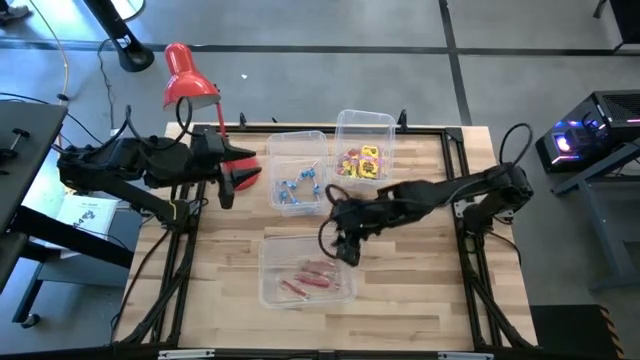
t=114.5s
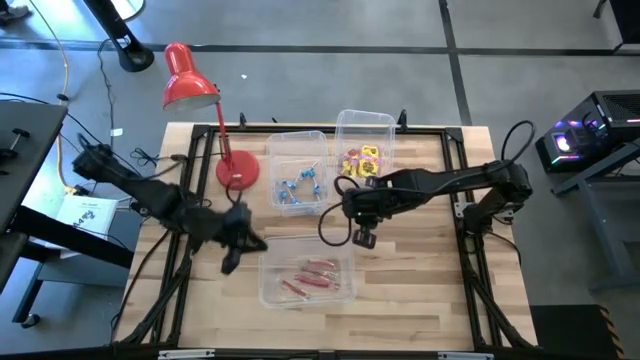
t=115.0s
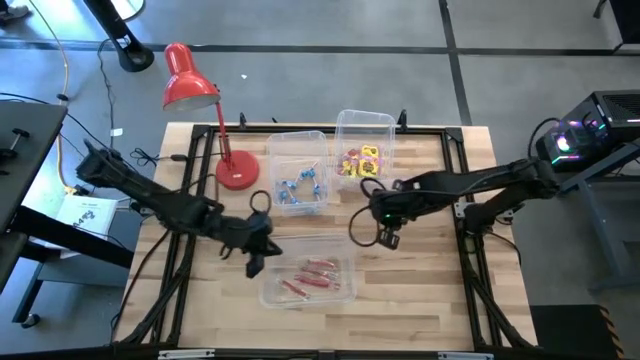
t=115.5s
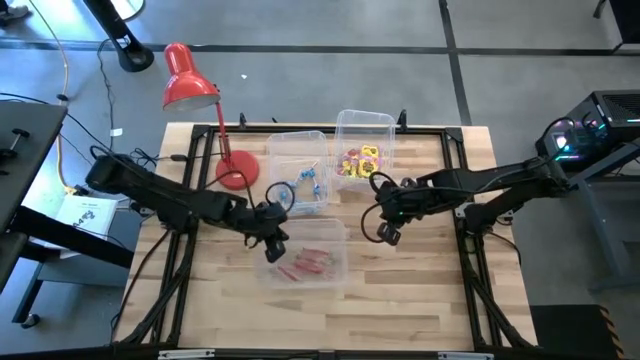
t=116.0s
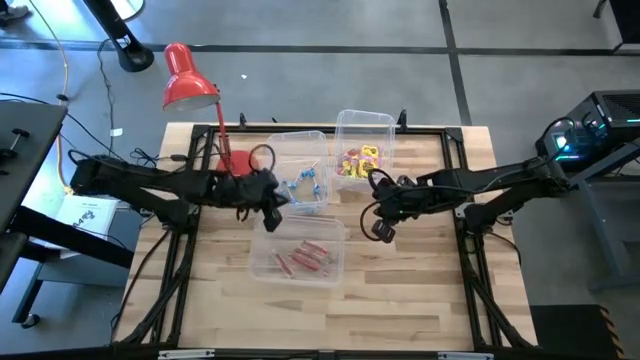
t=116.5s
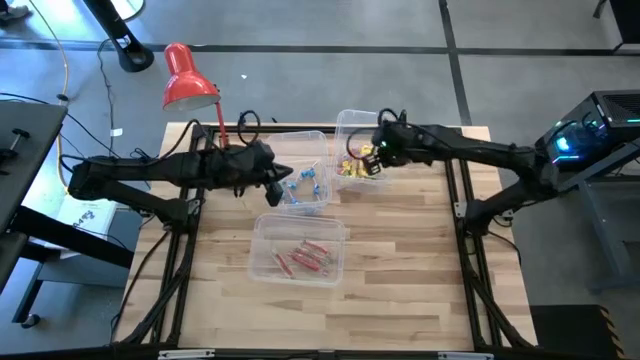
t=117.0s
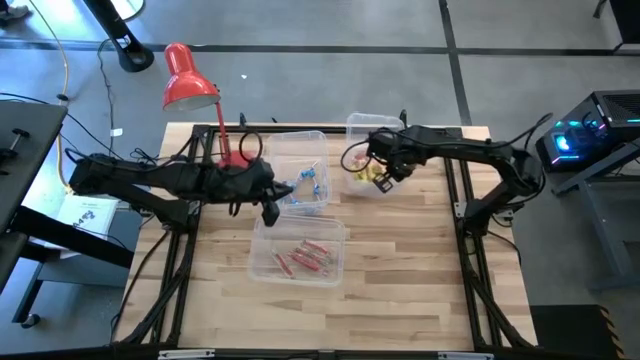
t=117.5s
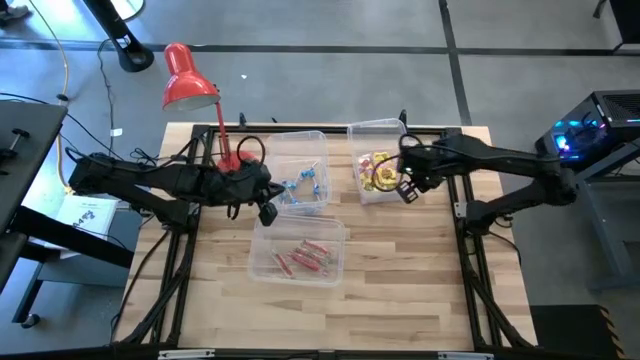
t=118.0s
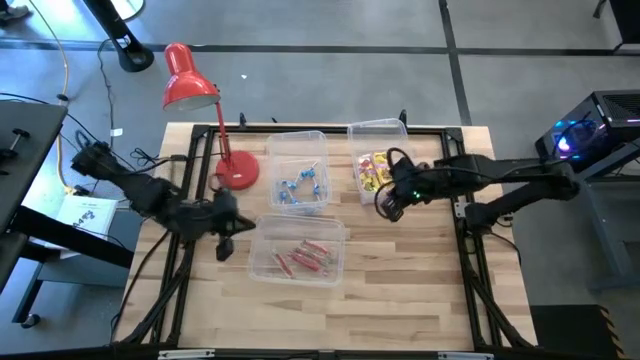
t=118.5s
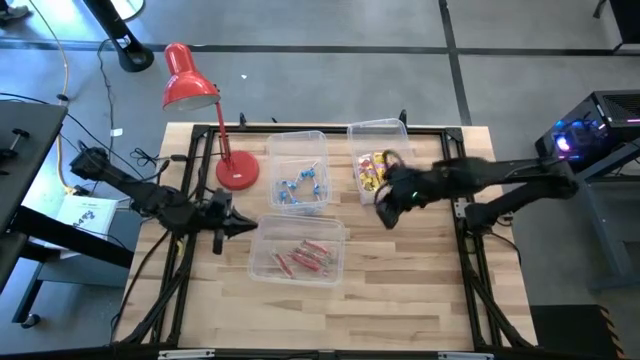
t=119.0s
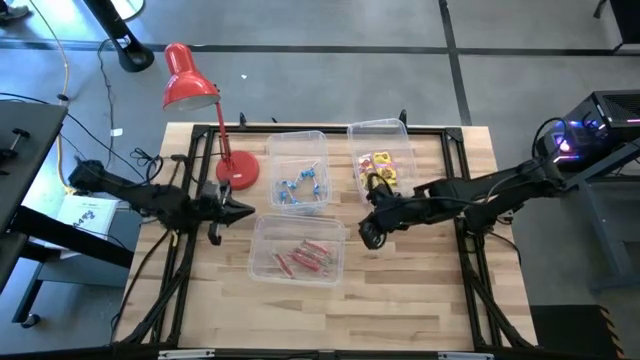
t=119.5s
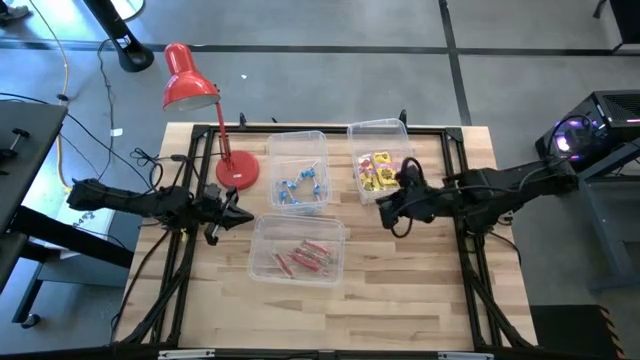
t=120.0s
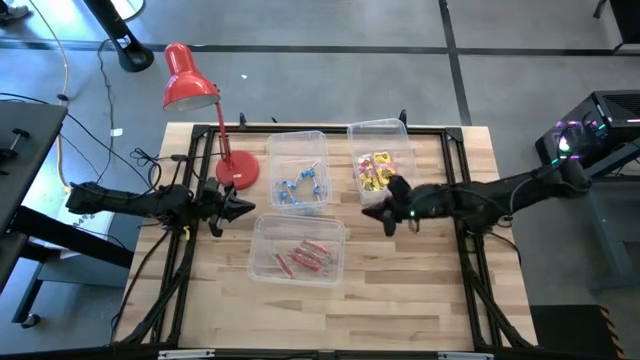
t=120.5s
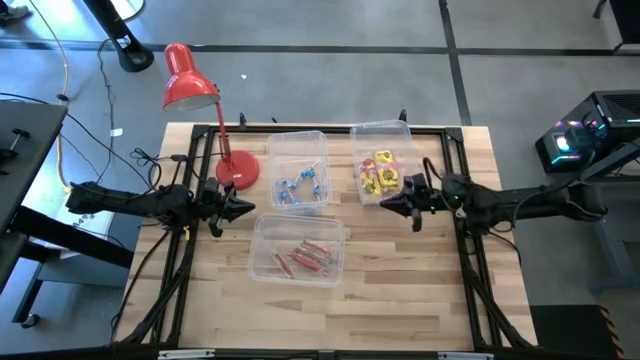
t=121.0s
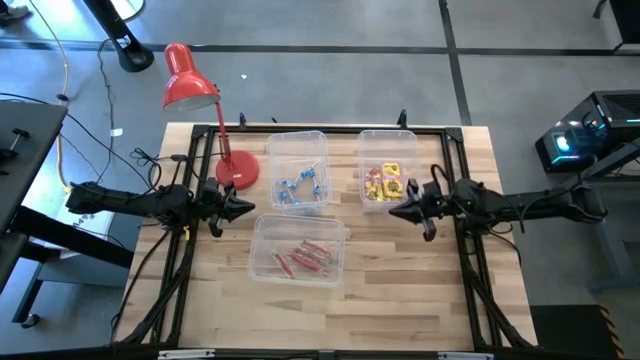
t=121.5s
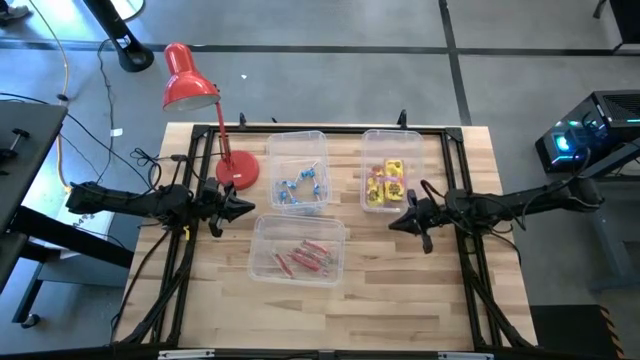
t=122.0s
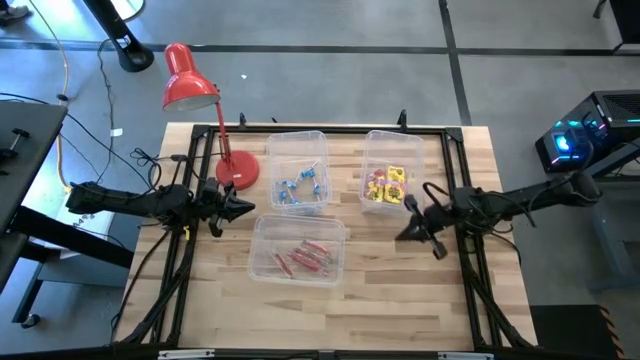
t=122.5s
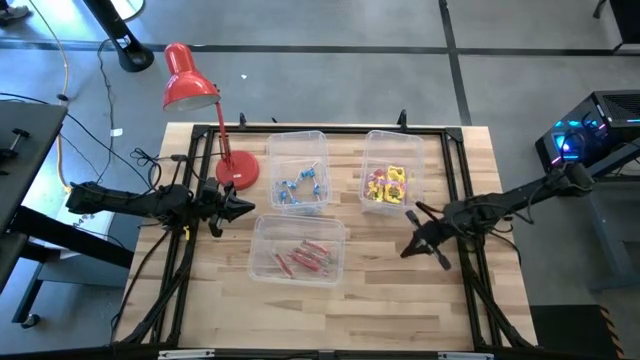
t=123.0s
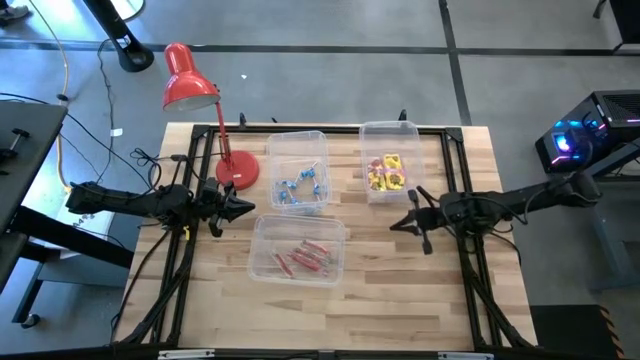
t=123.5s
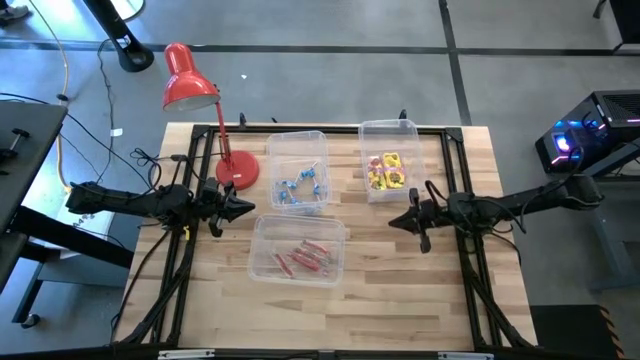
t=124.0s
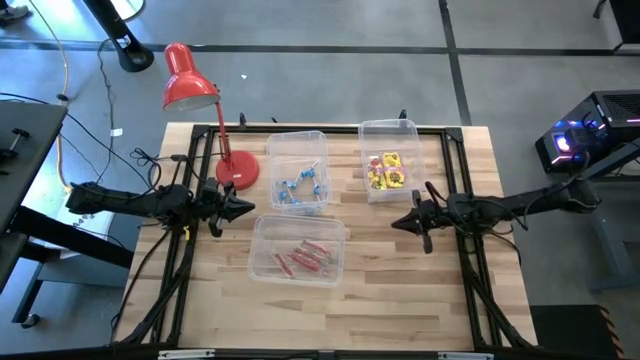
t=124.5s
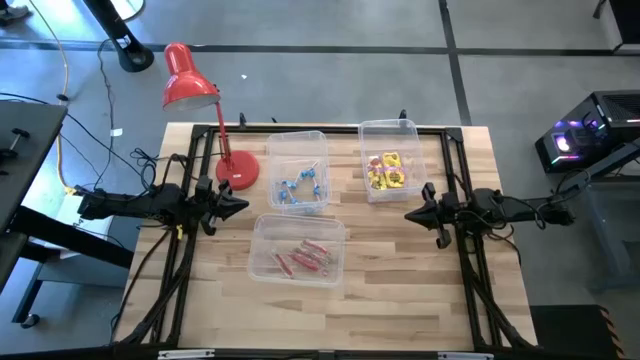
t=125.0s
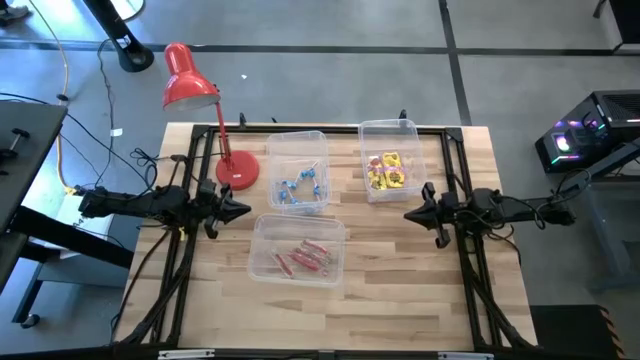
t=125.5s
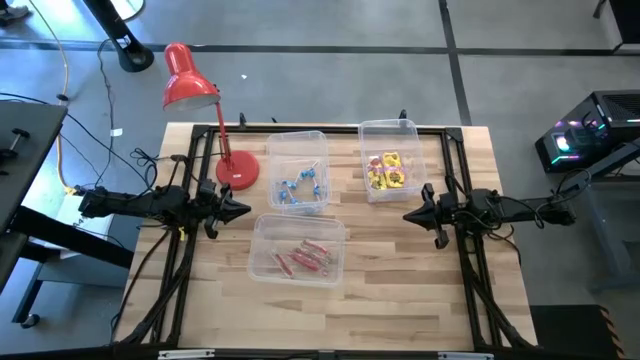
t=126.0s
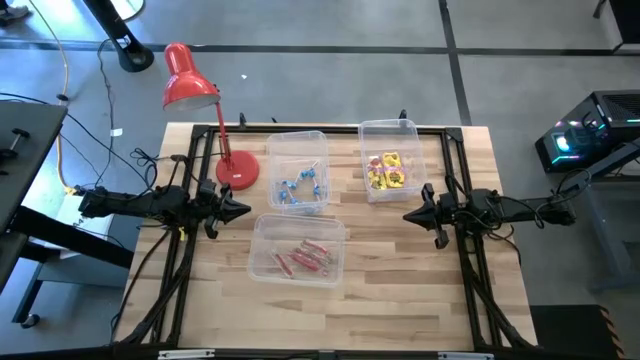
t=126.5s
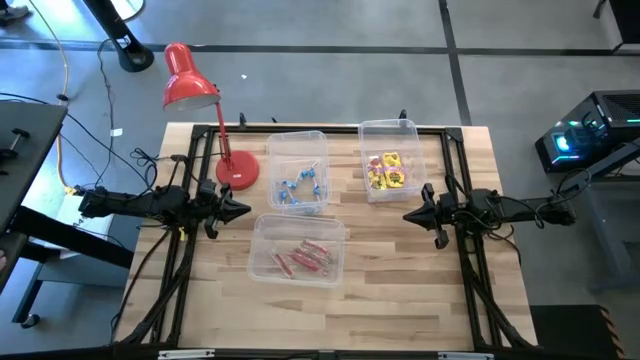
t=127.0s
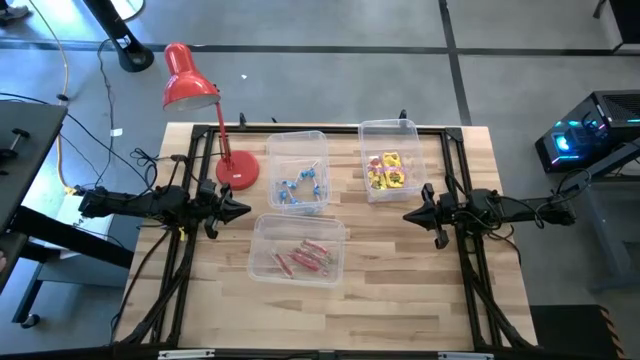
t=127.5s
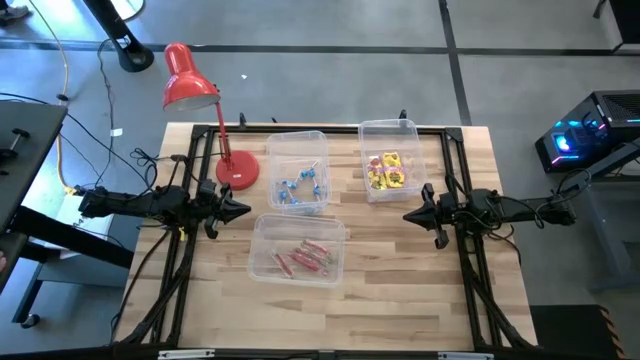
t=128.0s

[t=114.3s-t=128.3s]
Task: Sort candy
Return to Home Position

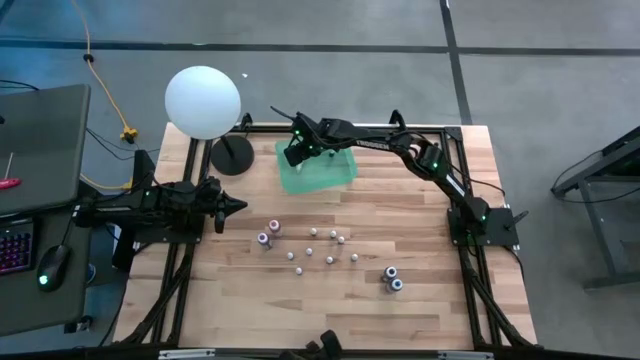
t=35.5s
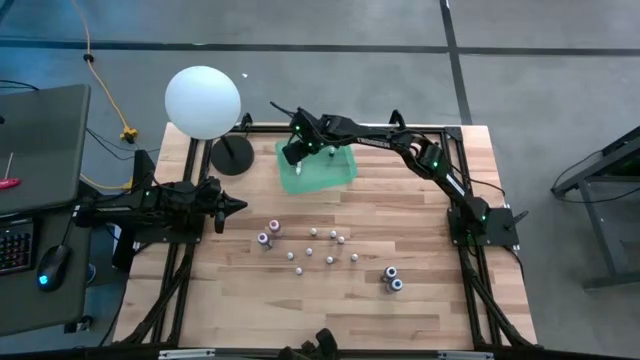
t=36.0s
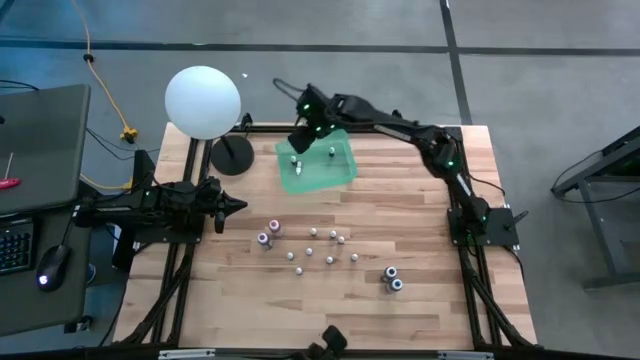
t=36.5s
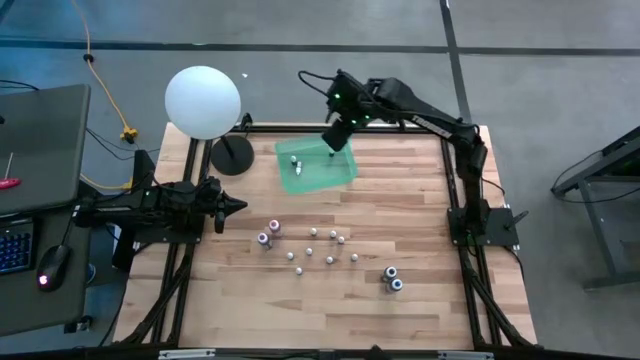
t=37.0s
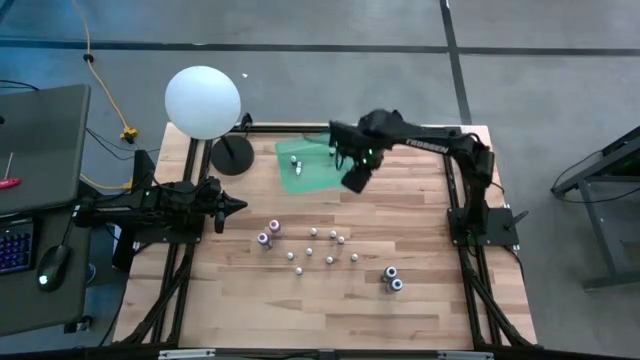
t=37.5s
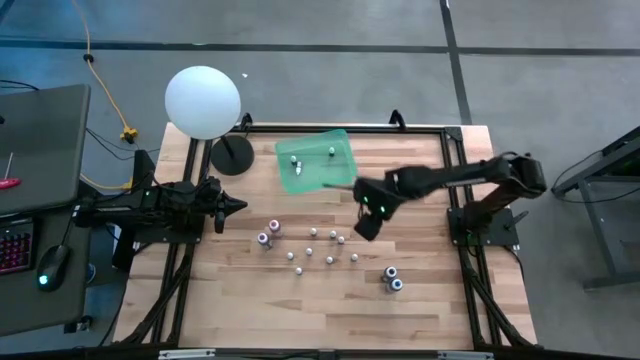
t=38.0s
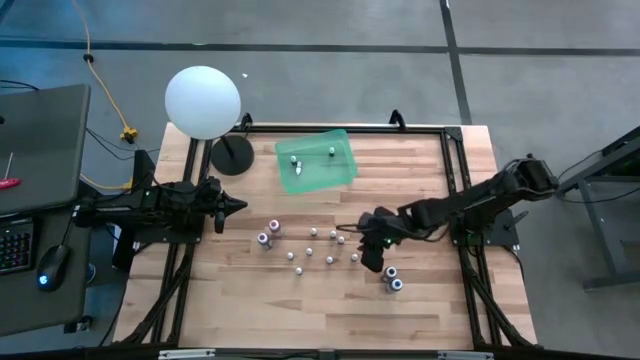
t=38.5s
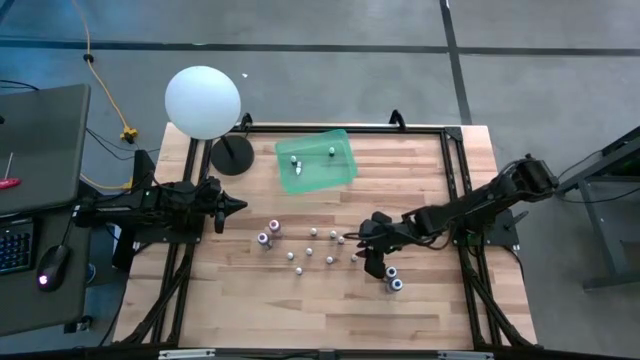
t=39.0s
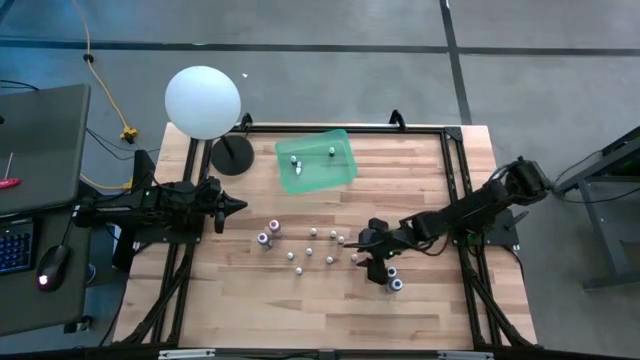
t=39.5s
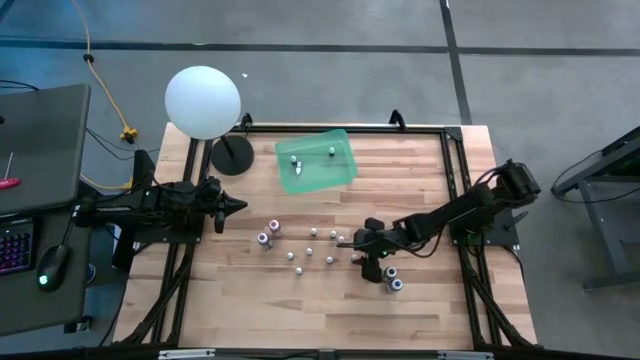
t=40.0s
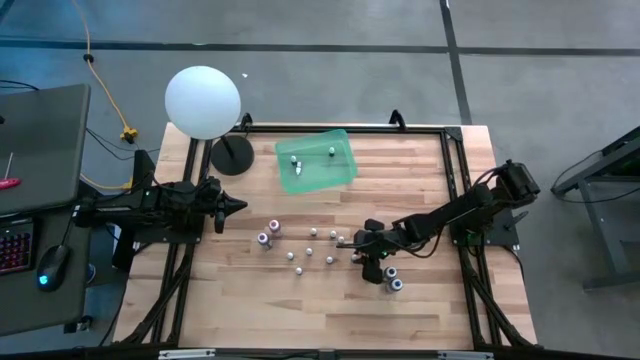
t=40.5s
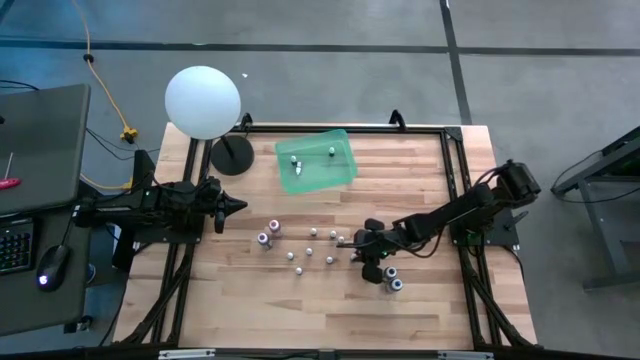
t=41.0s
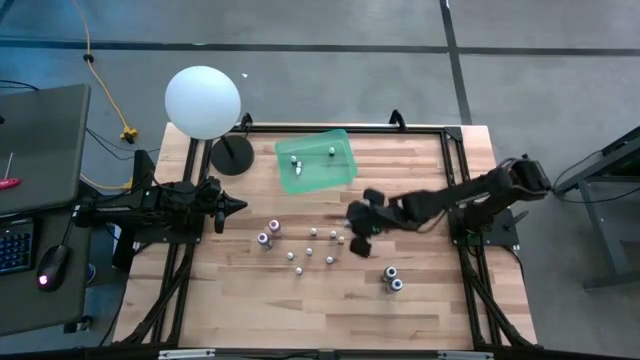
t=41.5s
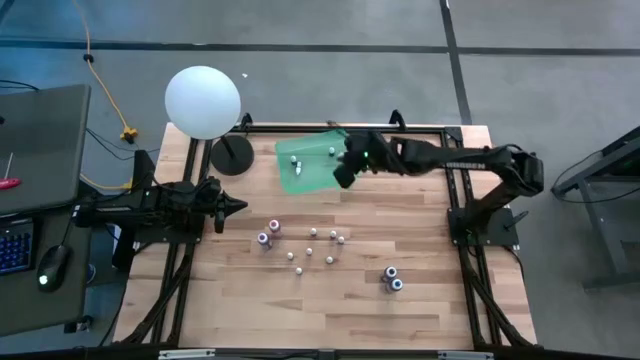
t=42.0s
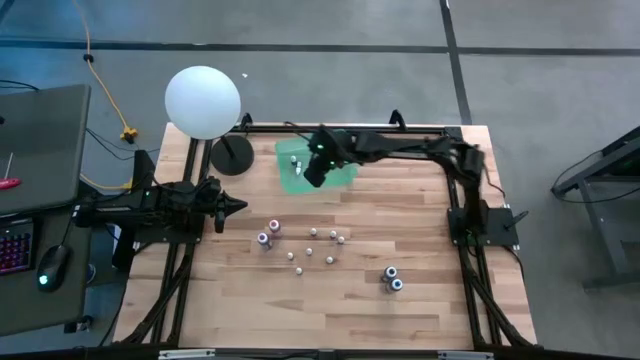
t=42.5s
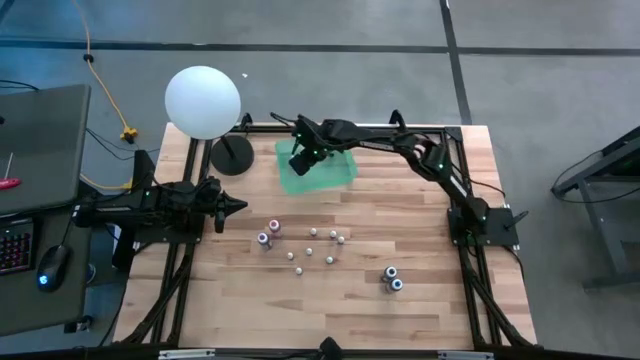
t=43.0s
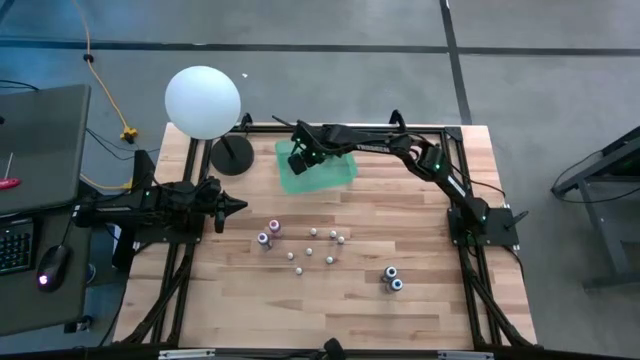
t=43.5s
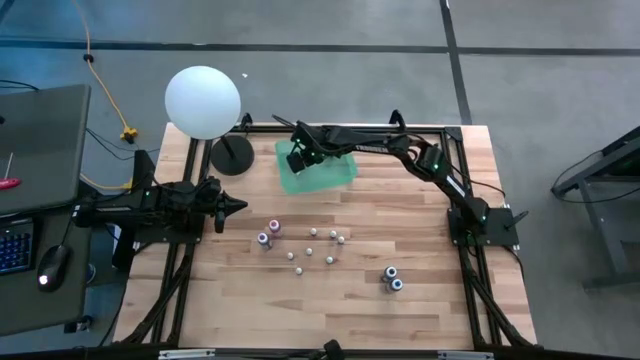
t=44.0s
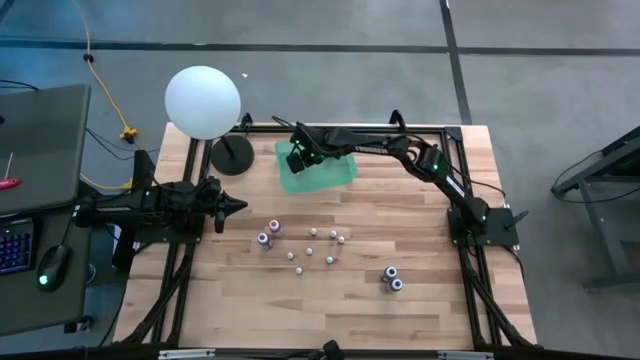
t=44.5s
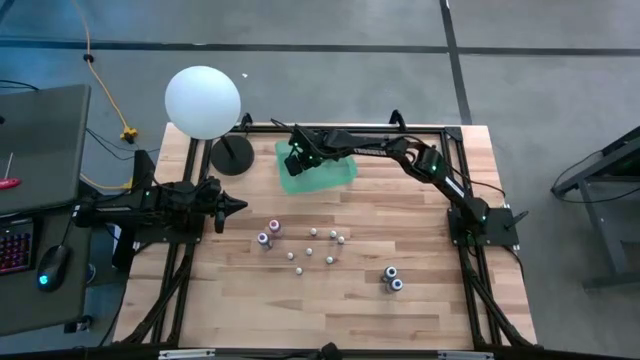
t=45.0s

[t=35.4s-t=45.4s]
Task: Pick & Place food coloring
Put the small purple dye bottle in the green bin
